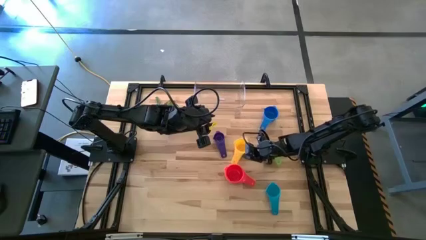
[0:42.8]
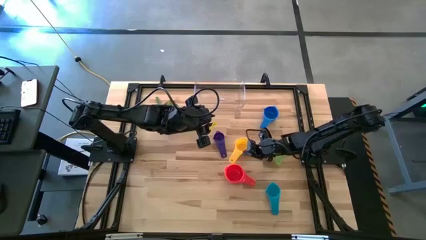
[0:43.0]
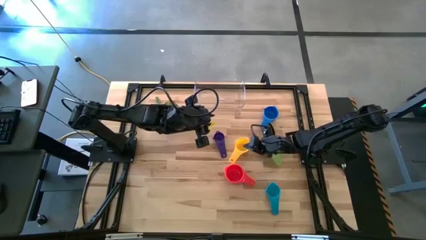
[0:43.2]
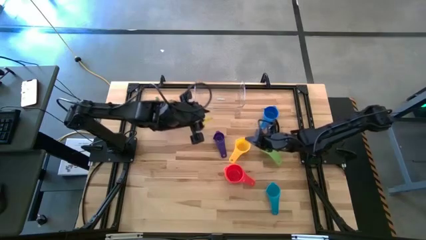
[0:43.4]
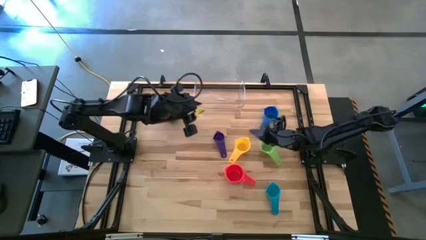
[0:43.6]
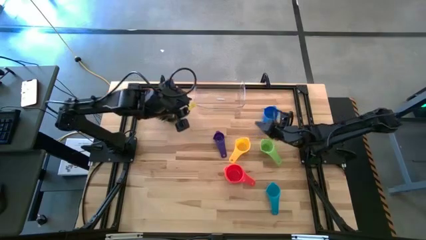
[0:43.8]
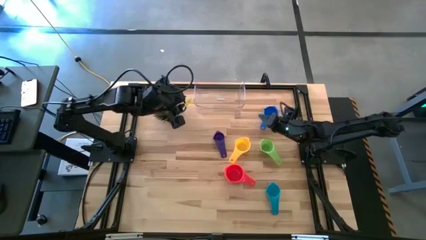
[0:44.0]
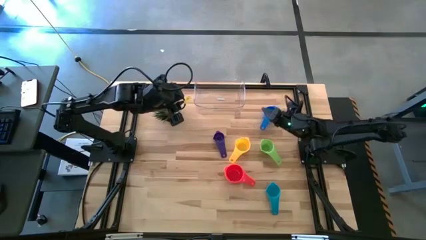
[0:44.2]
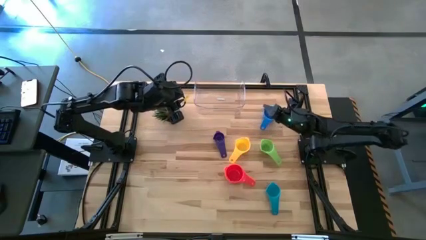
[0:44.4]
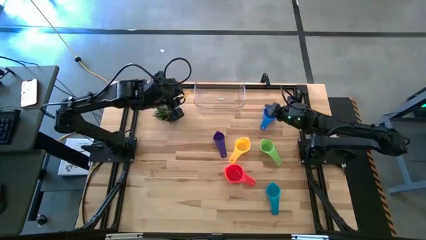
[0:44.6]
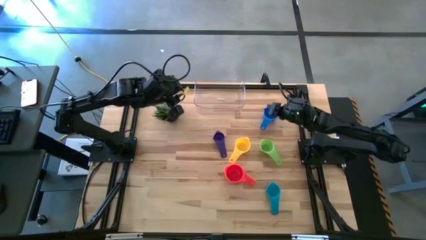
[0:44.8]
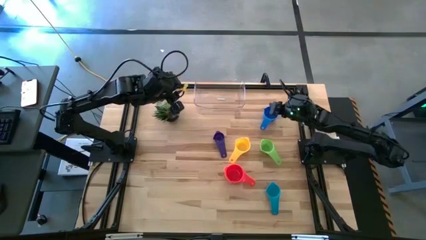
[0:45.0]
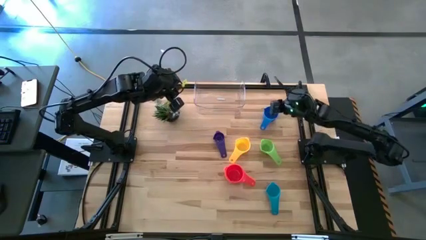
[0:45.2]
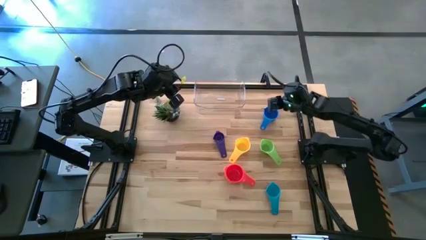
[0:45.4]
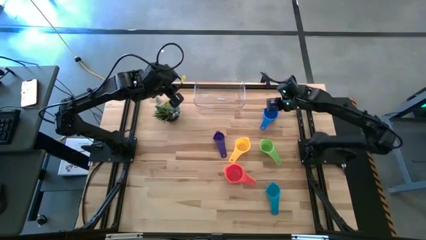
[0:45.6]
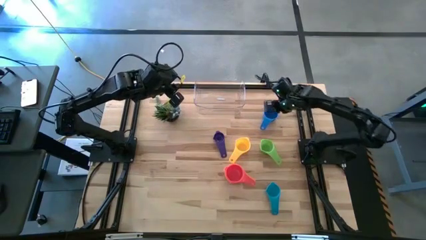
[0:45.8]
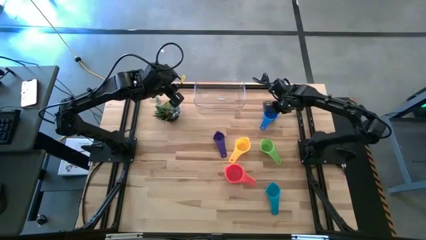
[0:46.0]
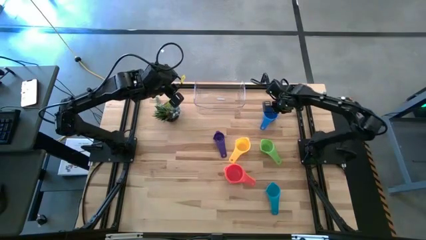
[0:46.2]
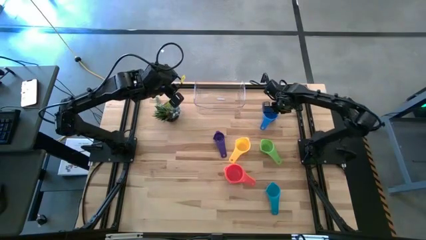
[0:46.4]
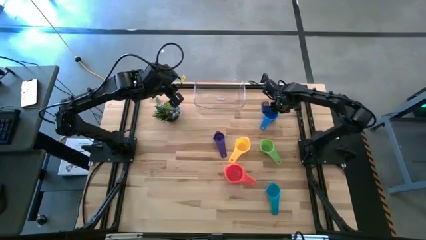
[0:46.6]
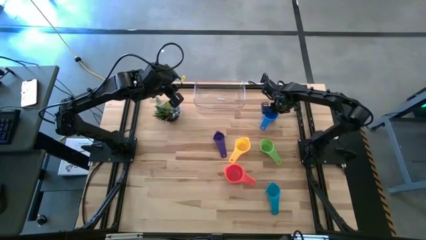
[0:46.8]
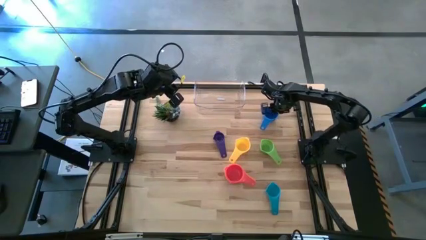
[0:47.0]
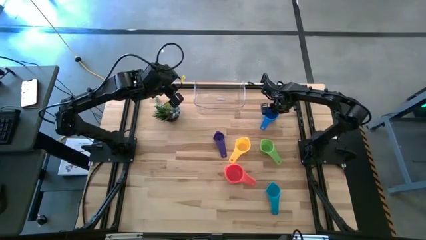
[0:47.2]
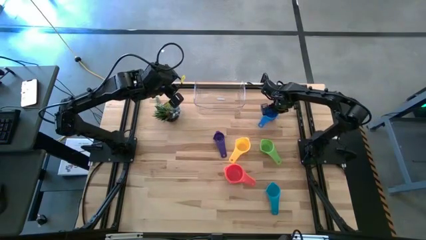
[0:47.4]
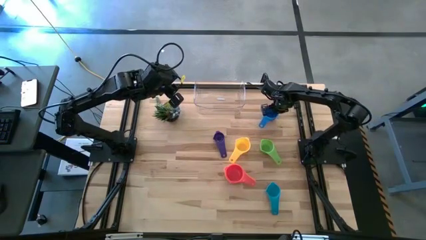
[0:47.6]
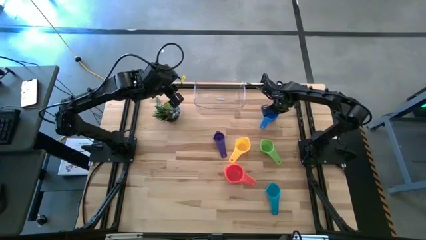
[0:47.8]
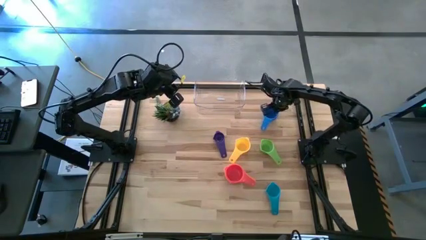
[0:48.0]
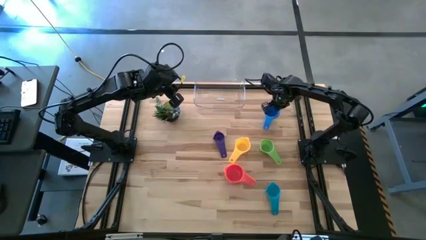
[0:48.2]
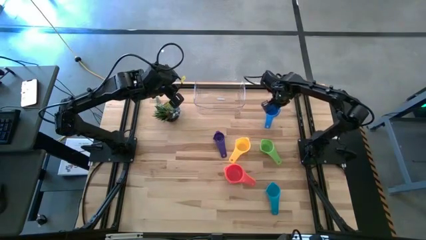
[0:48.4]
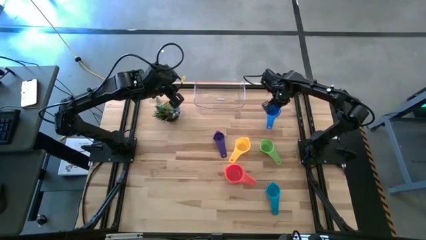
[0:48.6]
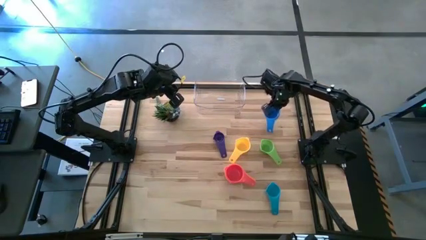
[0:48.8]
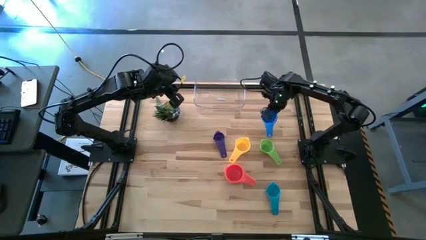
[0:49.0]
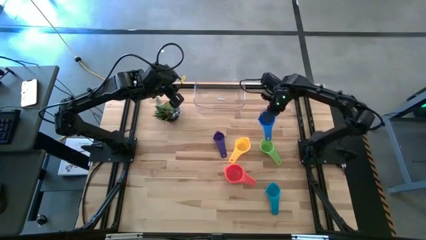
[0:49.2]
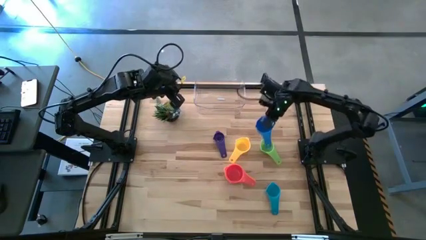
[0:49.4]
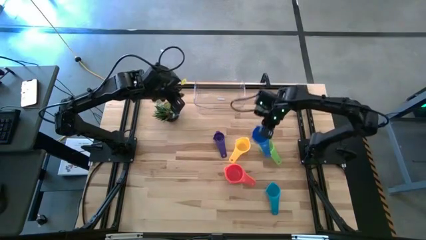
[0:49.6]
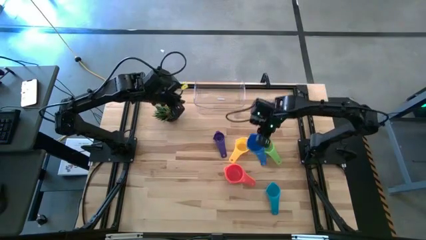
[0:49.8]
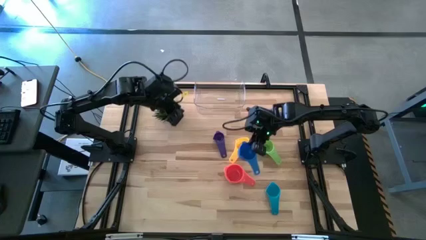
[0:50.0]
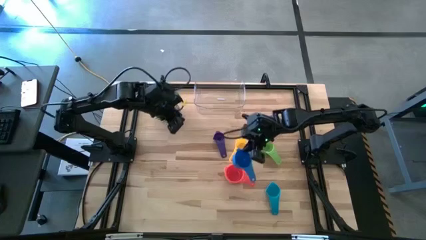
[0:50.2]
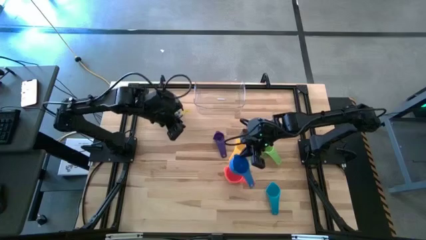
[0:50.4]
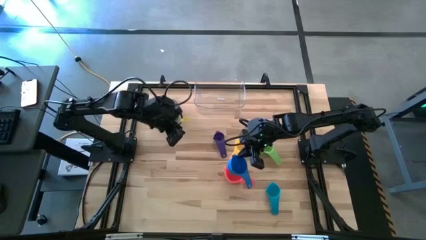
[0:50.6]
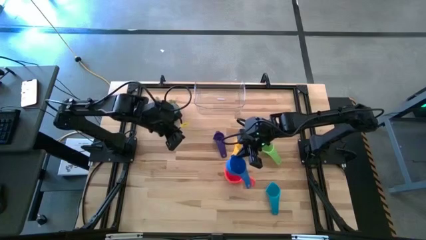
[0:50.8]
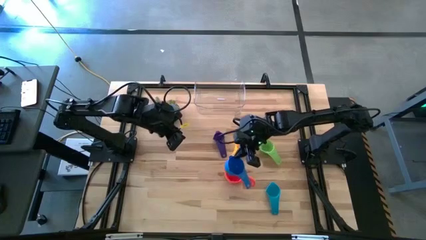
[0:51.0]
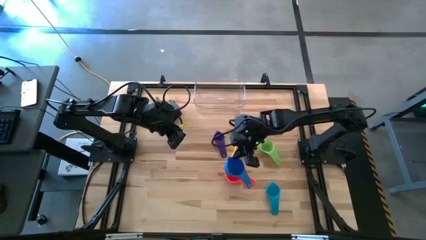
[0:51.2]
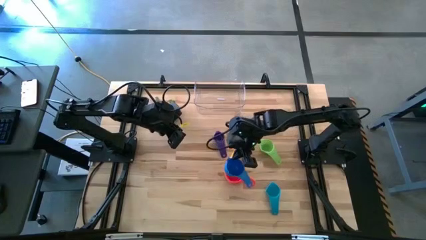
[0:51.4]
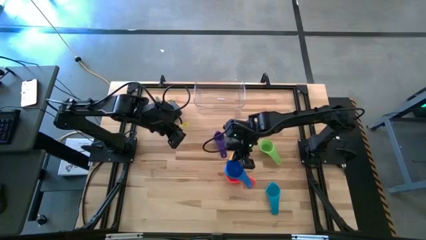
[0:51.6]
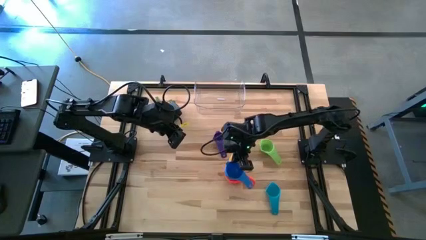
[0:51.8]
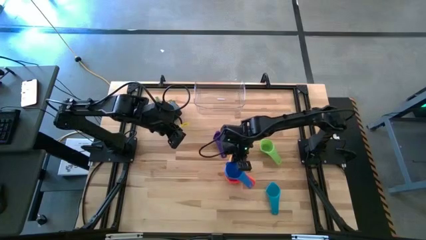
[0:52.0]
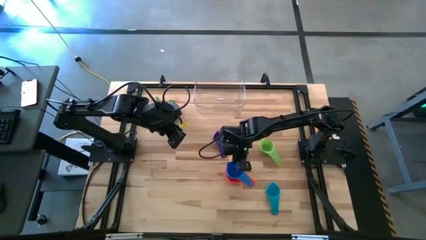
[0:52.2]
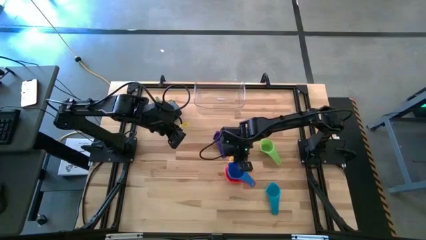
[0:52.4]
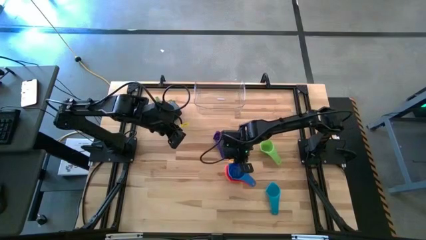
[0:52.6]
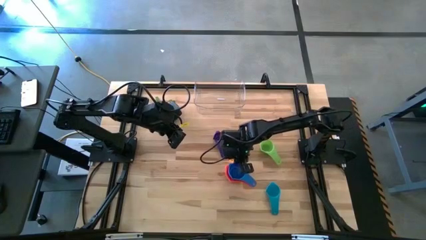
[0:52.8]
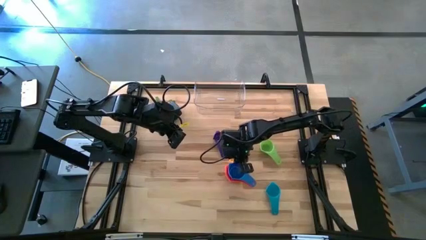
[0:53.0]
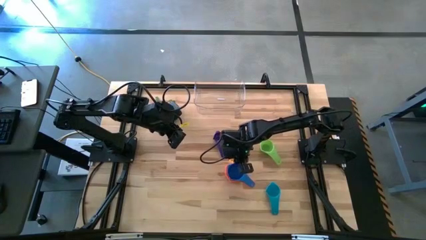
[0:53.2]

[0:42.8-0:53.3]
Task: Nest measuring cups in basket
Stack the blue measuring cup on top of the red measuring cup

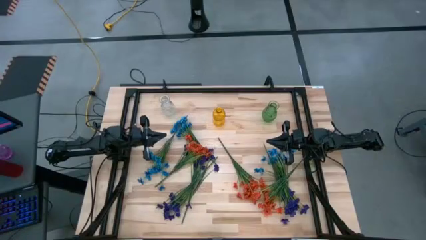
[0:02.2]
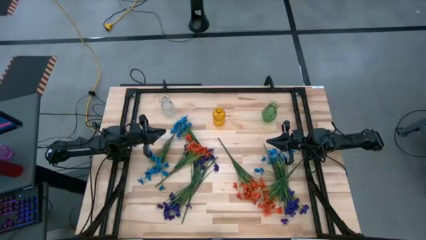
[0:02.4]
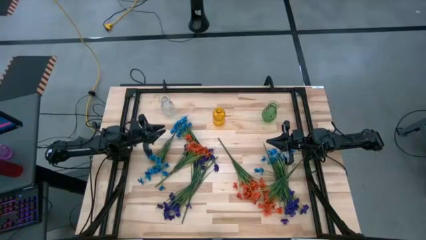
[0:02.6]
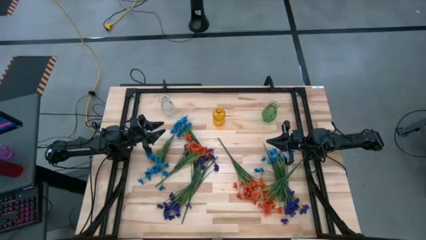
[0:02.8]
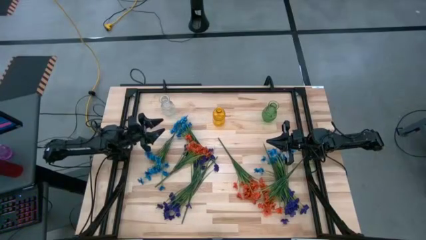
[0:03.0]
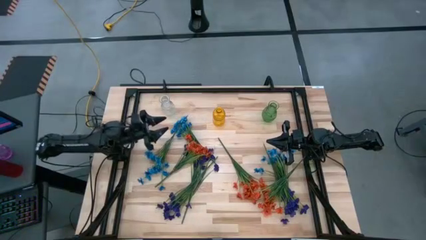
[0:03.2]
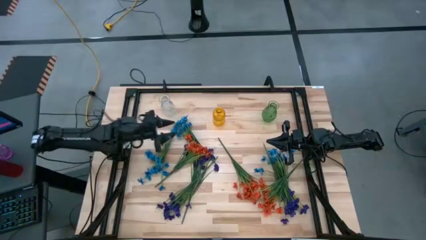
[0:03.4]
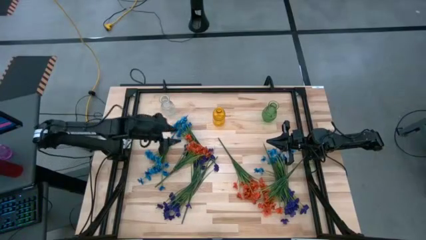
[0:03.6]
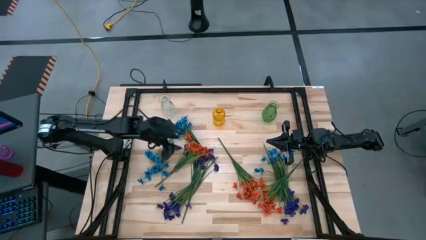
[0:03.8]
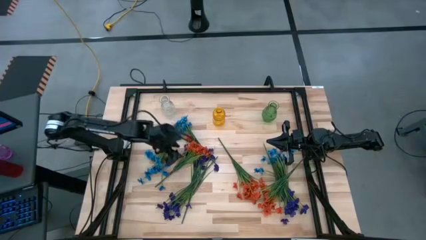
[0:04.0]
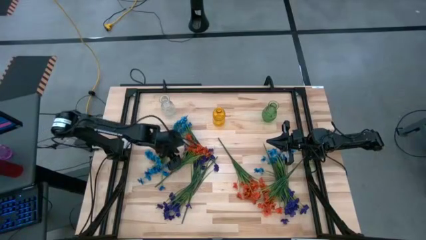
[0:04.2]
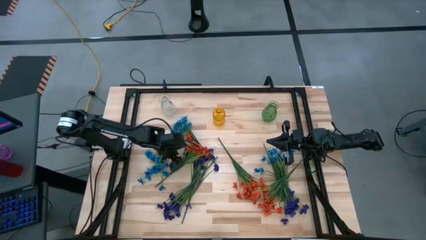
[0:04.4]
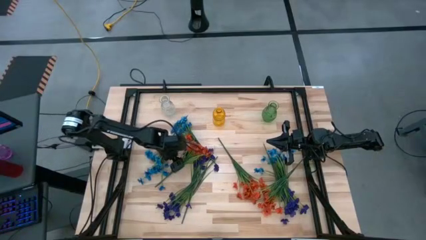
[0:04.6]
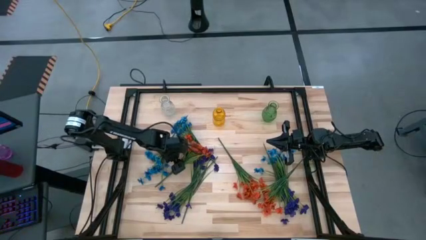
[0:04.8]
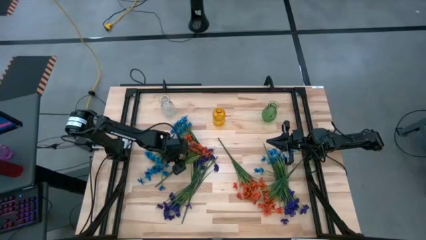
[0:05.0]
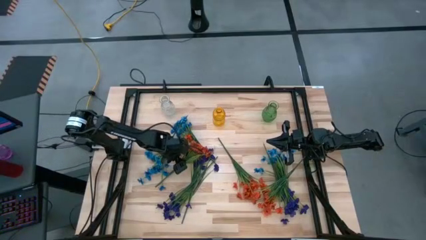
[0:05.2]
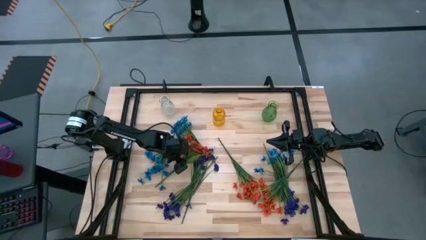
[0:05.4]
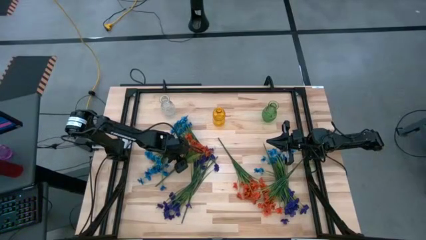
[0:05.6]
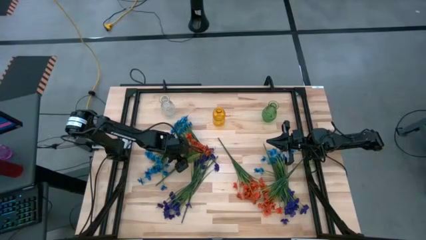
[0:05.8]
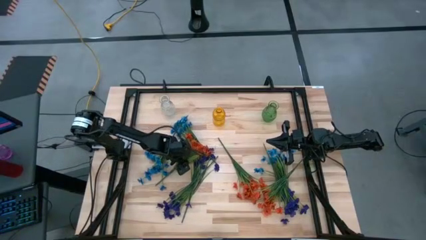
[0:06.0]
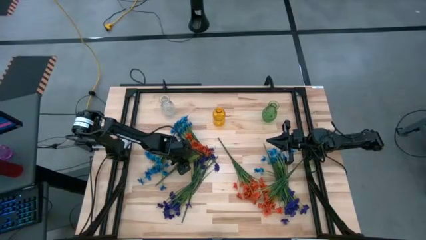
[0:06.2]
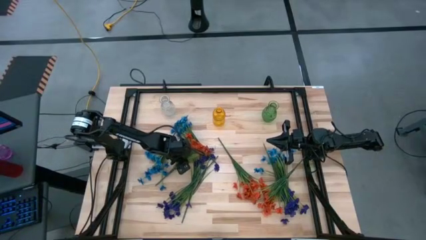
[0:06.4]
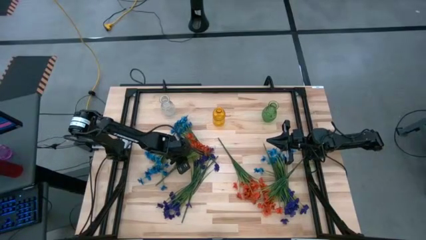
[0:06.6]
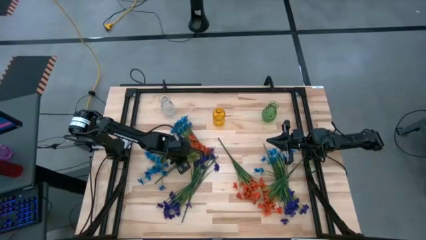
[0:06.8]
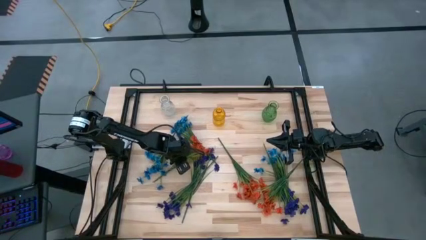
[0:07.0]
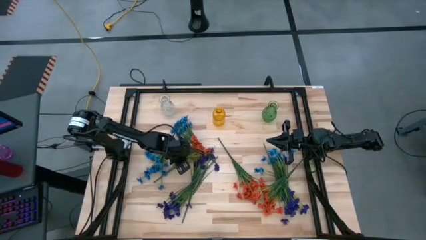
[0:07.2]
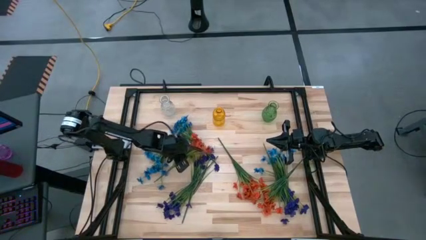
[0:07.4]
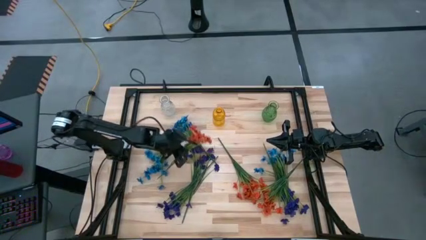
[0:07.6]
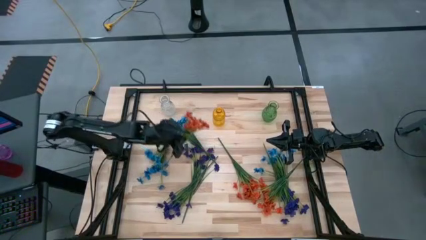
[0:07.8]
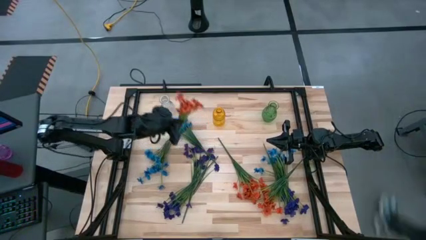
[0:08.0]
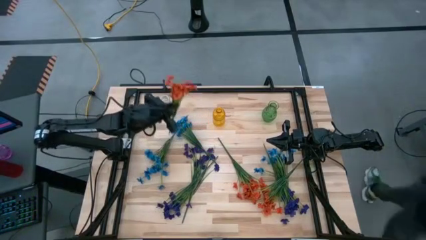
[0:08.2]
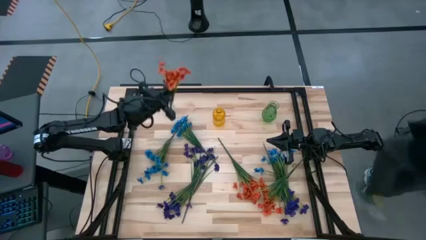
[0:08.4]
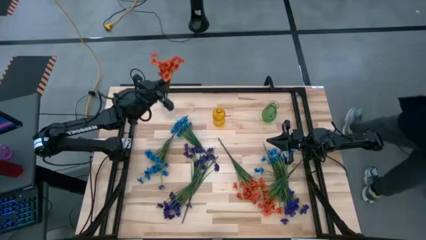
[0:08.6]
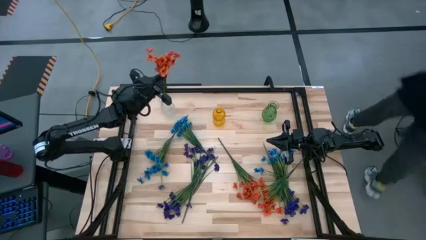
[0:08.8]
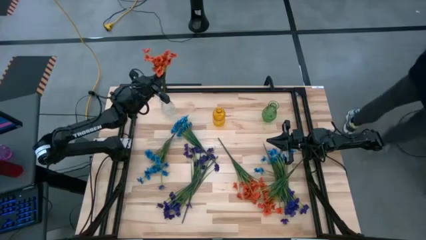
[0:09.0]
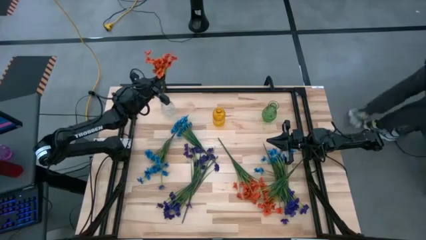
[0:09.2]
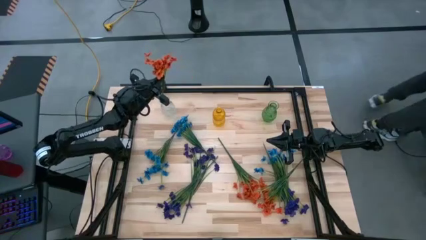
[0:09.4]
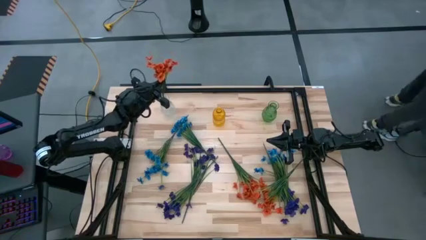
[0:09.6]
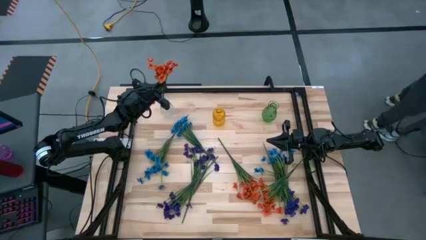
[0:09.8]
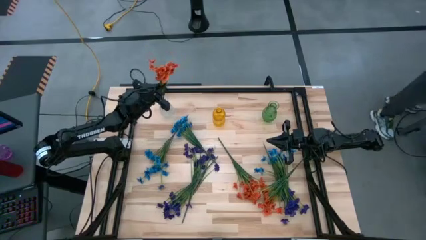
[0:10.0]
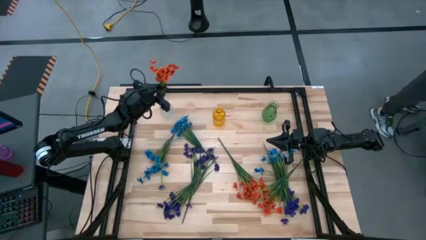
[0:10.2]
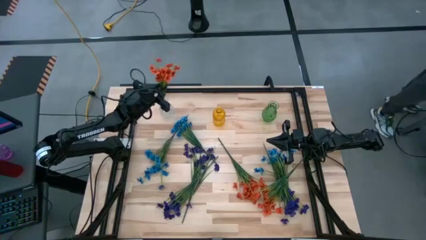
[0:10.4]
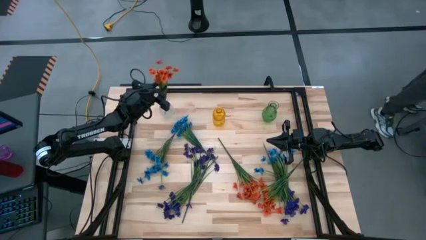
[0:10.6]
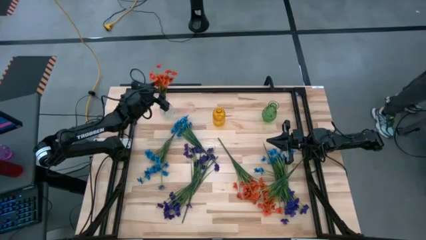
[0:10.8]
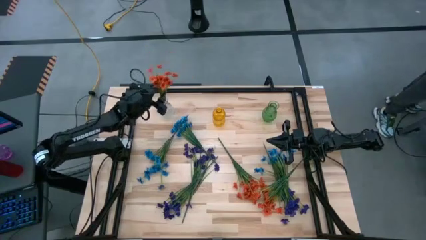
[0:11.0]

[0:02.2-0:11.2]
Task: Sort flowers into vase by color
Put the top orange flower into the transparent vase
